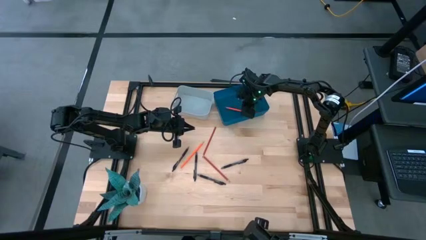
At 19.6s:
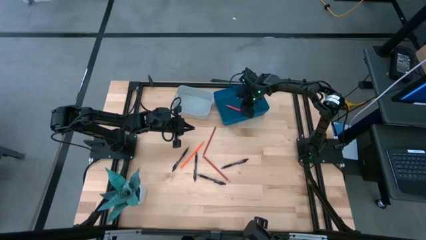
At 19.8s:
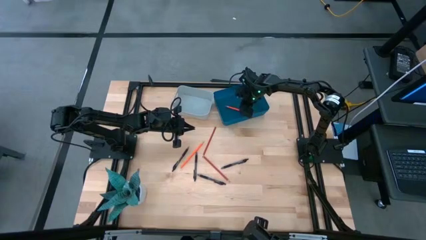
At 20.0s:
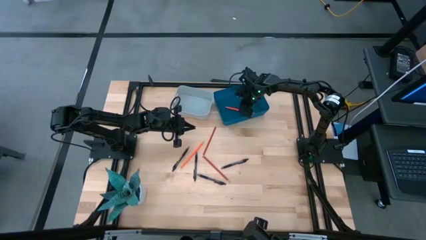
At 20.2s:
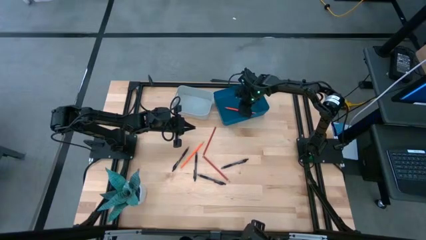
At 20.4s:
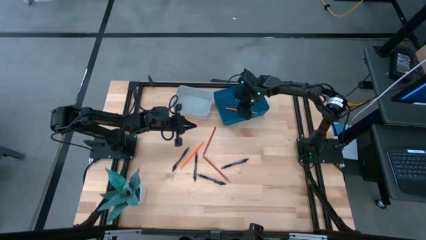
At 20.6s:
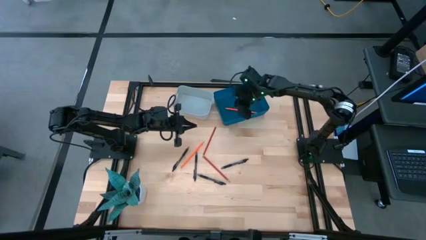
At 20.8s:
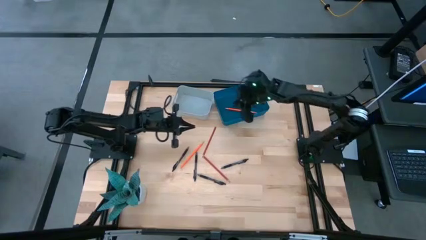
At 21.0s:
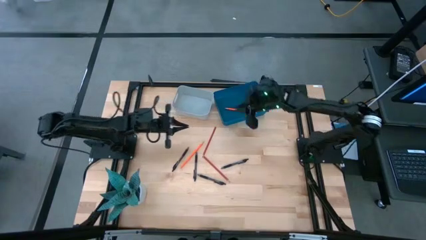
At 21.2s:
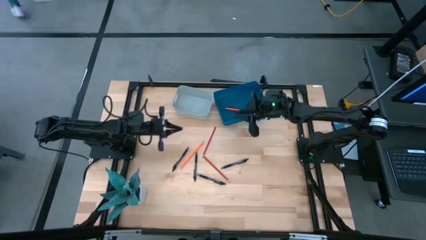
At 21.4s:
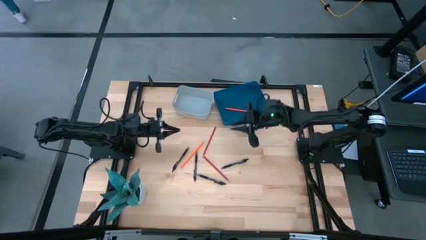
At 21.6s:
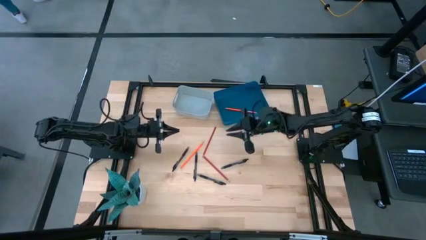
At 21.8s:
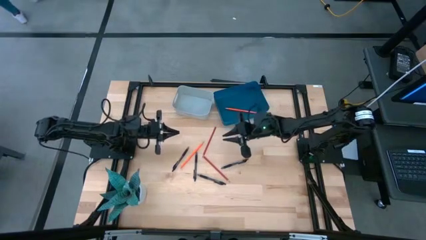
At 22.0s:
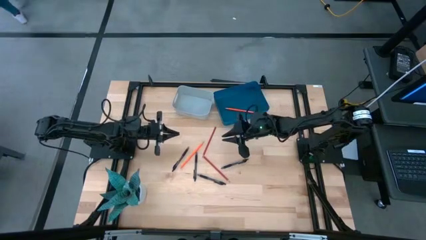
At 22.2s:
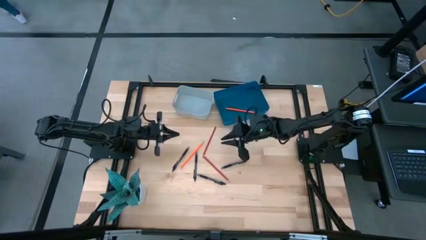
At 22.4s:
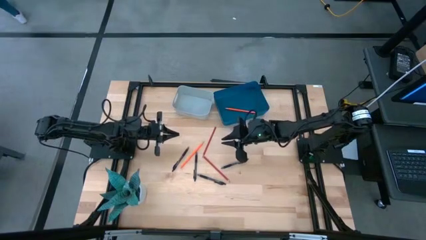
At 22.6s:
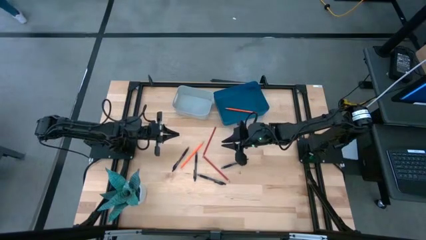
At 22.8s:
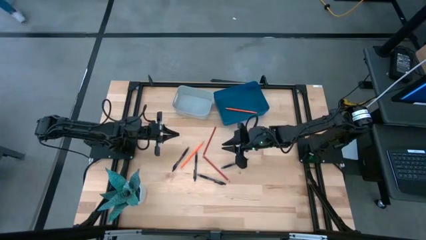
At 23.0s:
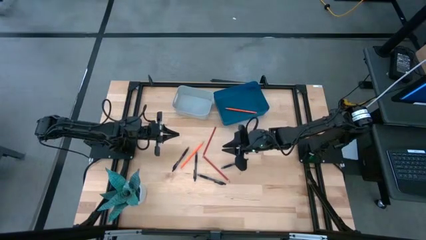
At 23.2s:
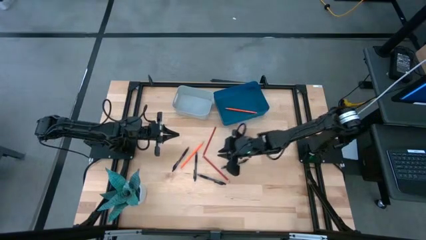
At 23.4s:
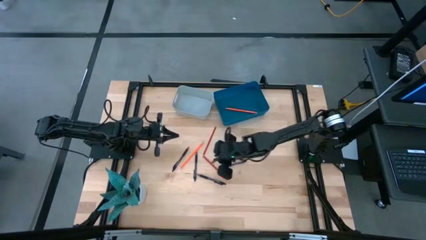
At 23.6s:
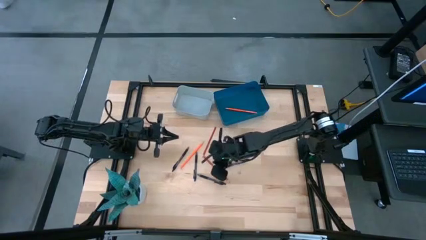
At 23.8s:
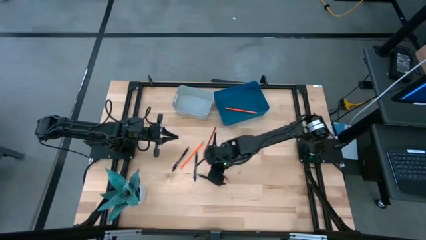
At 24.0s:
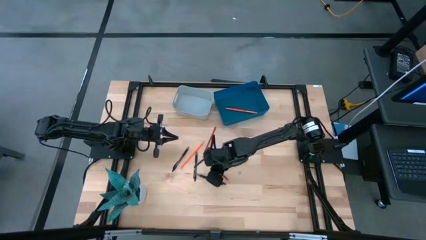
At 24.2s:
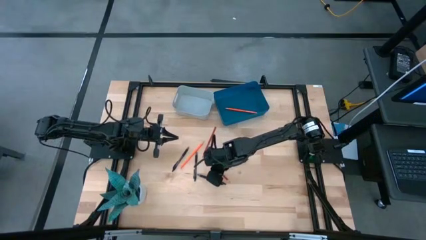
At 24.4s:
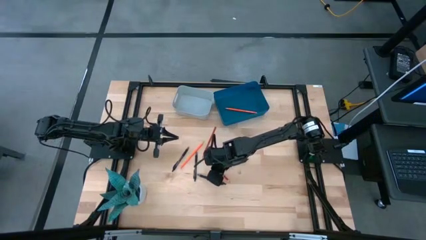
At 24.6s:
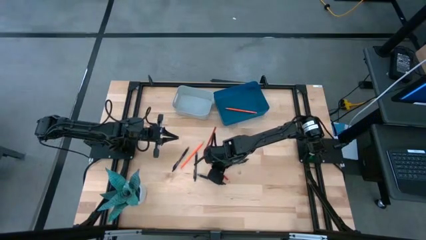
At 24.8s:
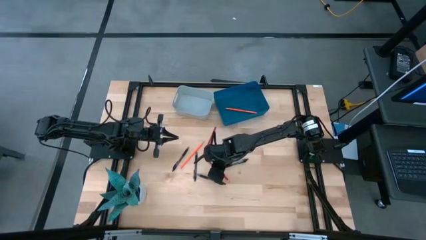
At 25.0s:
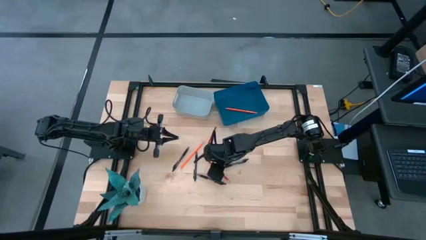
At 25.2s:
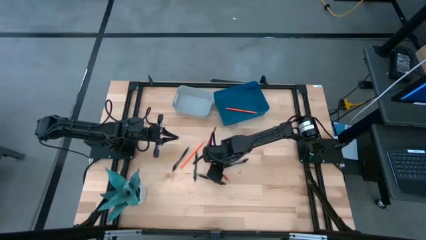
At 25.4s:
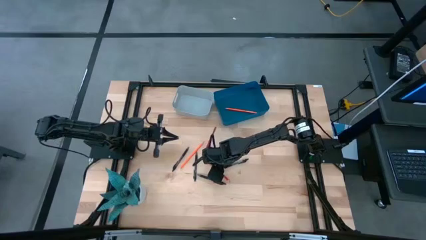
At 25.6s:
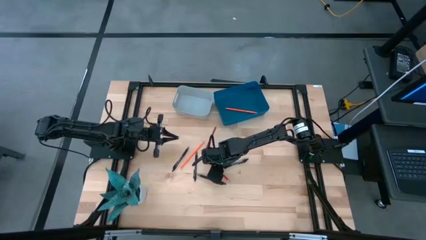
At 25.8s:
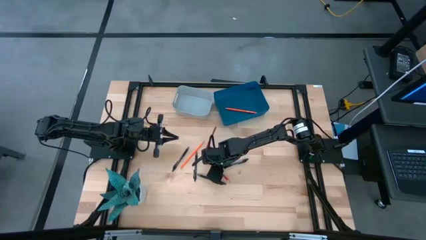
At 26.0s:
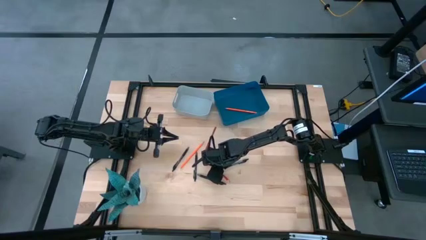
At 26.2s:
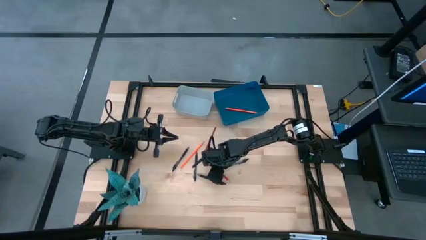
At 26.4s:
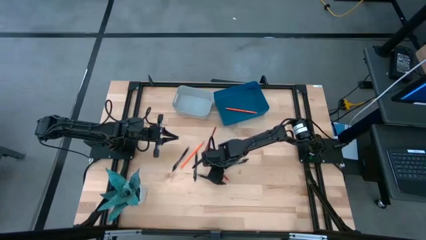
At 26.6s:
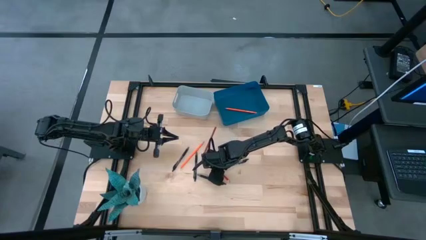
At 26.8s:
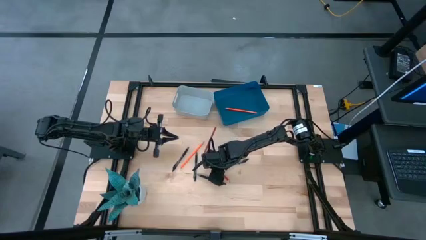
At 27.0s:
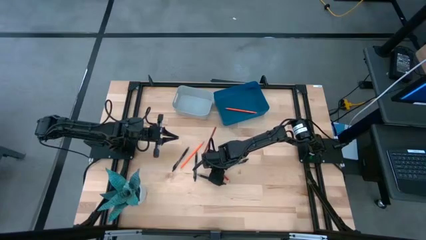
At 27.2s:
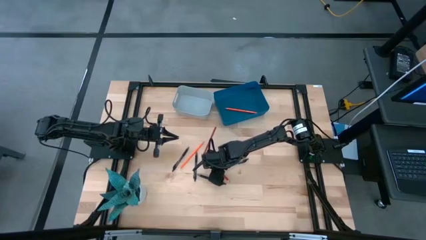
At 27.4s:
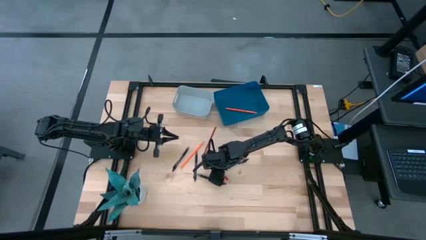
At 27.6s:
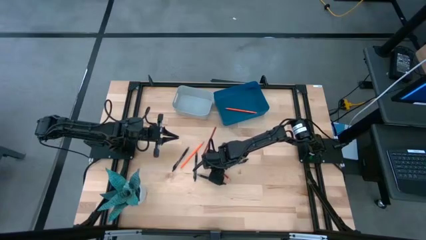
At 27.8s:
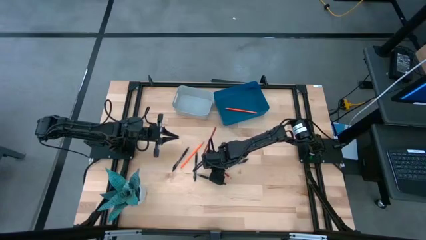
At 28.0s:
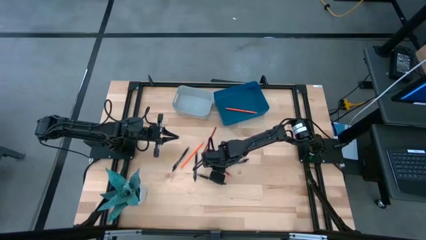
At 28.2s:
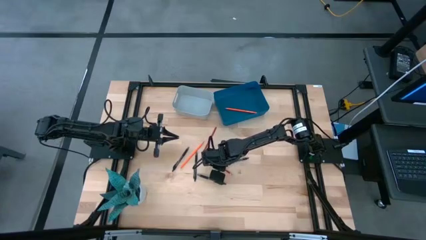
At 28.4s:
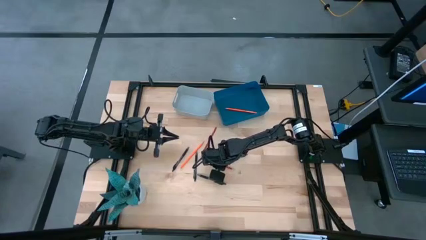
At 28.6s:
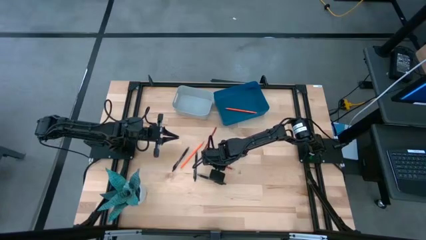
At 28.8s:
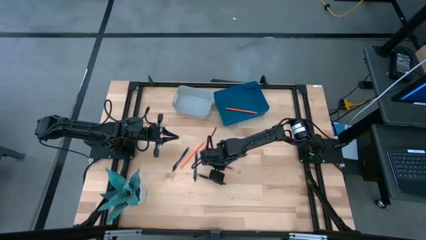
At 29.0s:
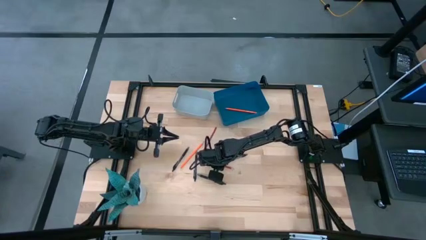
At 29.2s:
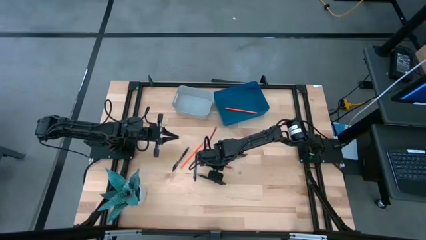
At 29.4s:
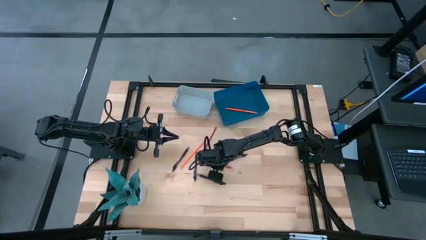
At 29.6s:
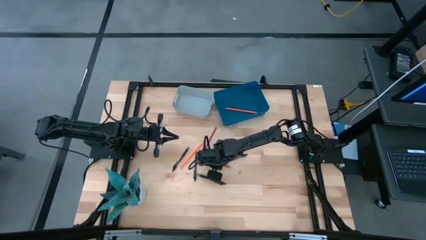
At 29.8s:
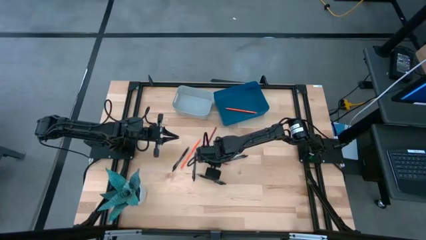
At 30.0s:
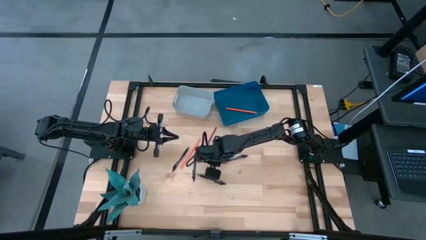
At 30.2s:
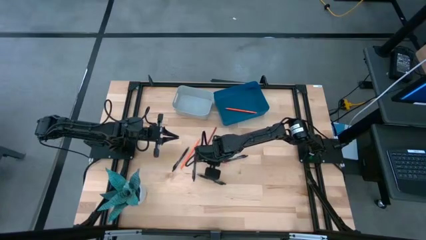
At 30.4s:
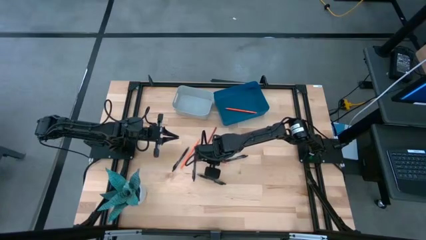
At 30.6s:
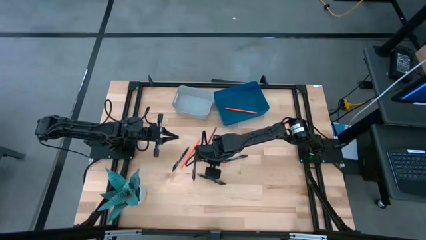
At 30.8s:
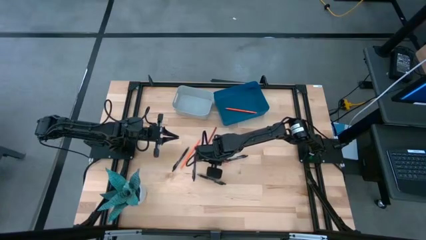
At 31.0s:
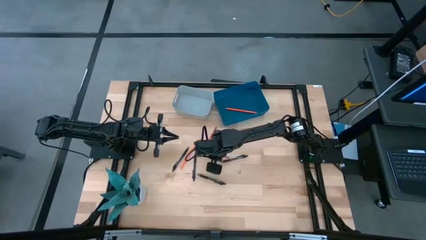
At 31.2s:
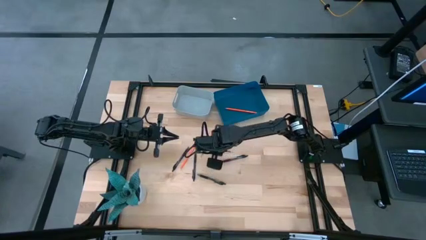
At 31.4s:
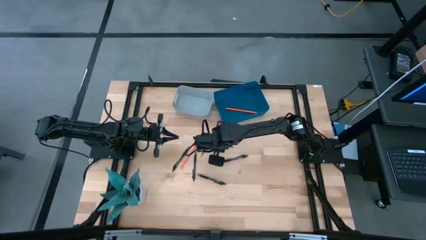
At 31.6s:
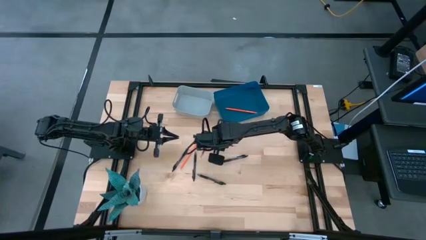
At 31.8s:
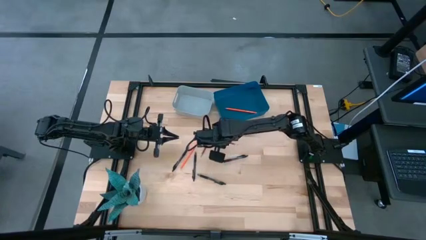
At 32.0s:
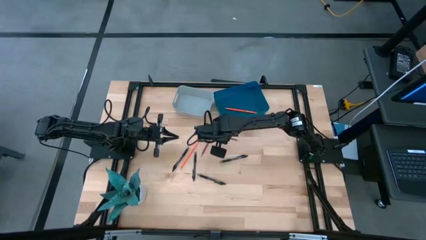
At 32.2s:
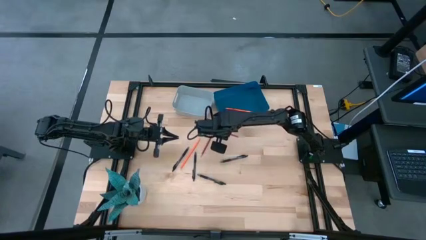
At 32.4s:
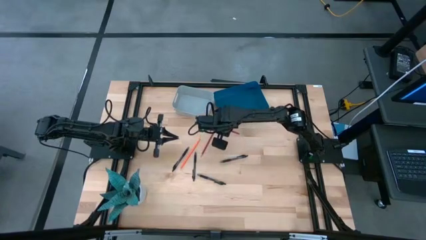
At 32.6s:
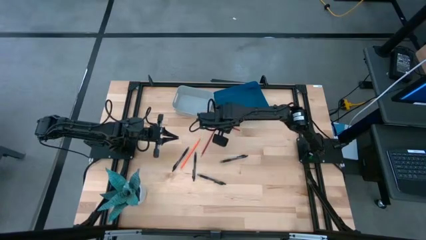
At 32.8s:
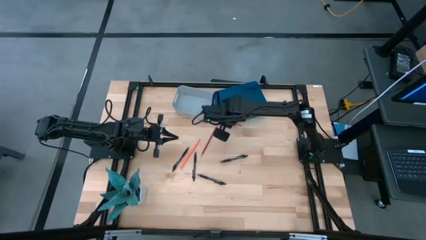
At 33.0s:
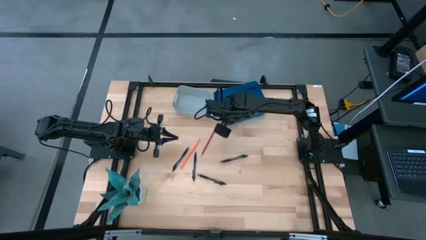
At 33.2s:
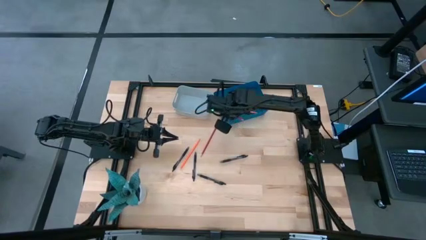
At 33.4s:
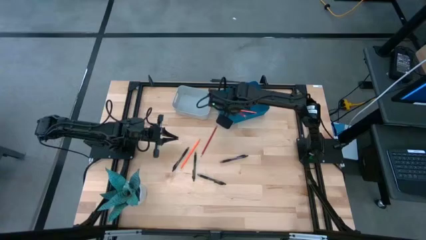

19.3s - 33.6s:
Task: Sort pens & pencils
Put the red pencil into the blue bin
